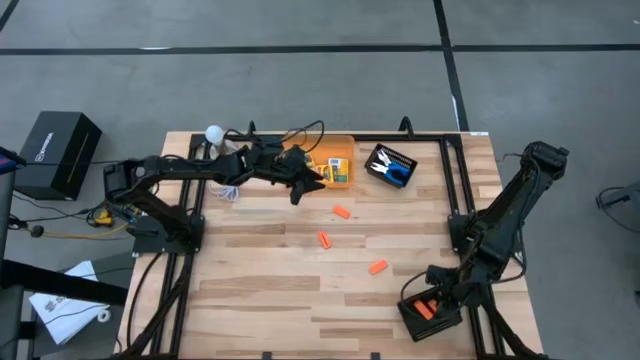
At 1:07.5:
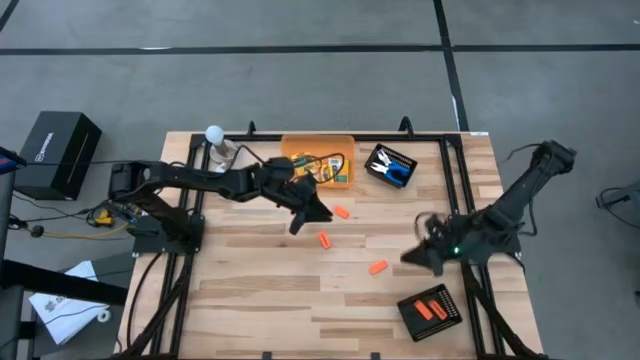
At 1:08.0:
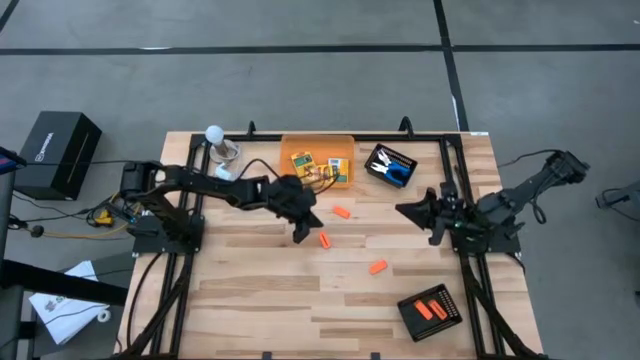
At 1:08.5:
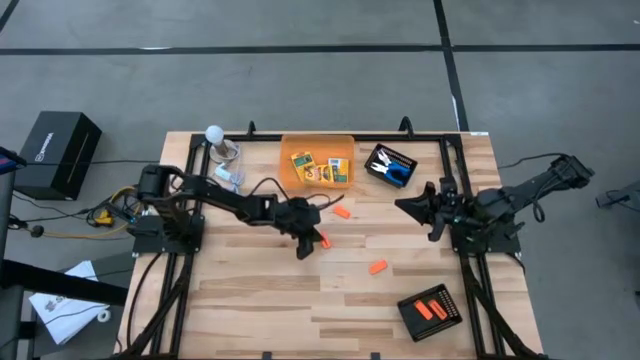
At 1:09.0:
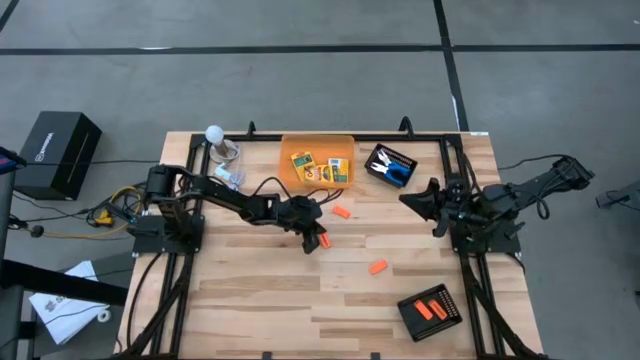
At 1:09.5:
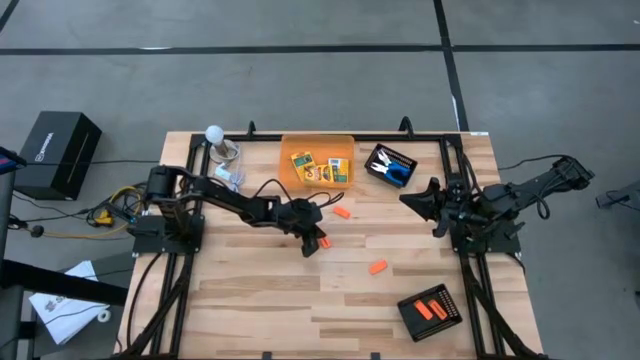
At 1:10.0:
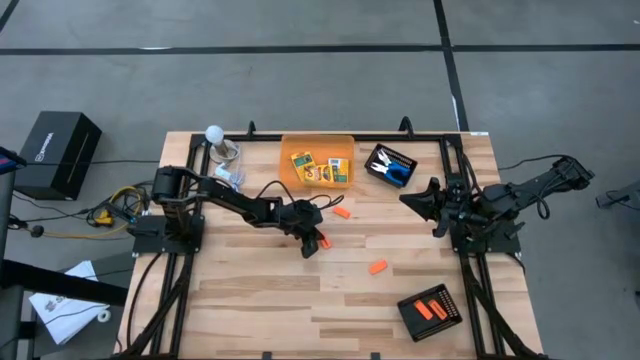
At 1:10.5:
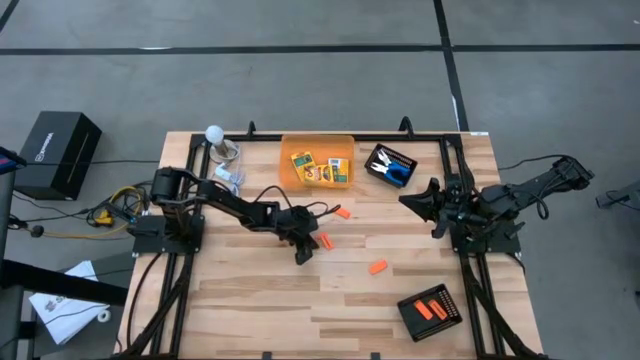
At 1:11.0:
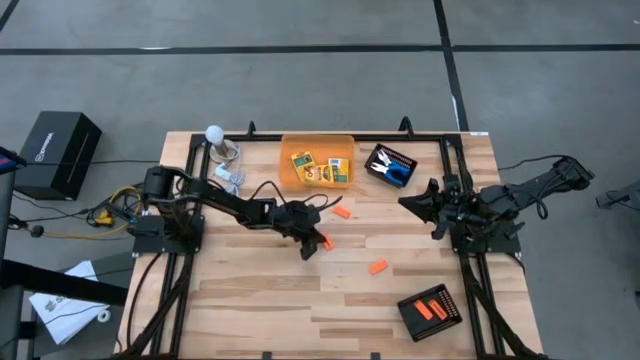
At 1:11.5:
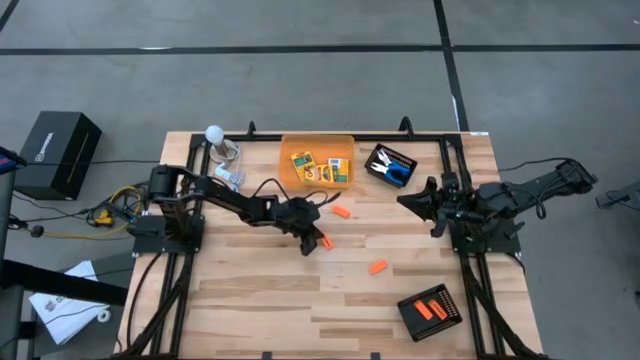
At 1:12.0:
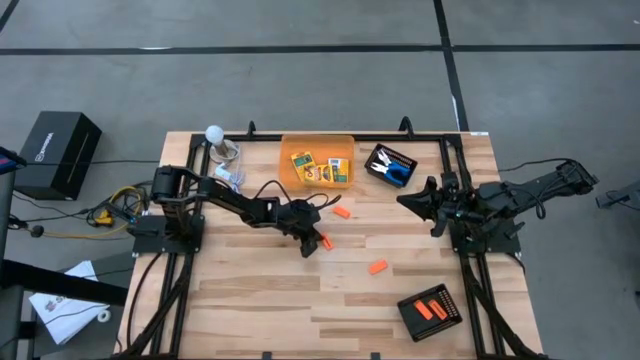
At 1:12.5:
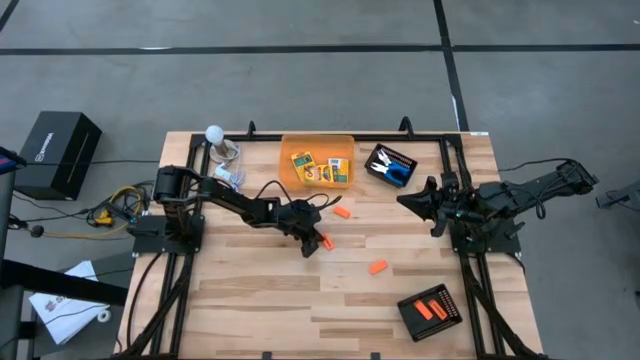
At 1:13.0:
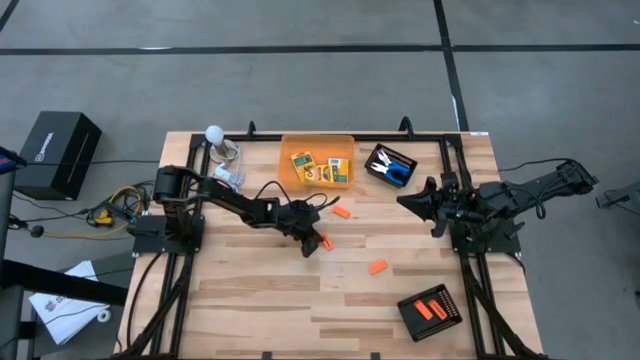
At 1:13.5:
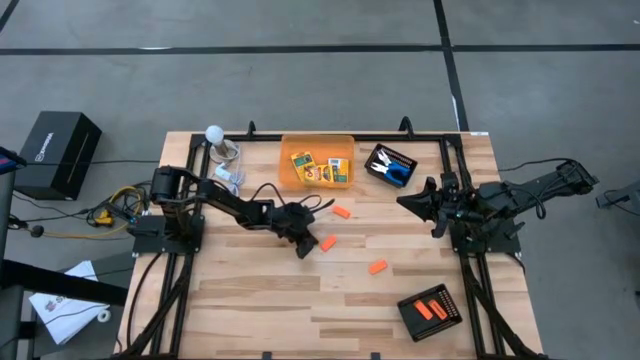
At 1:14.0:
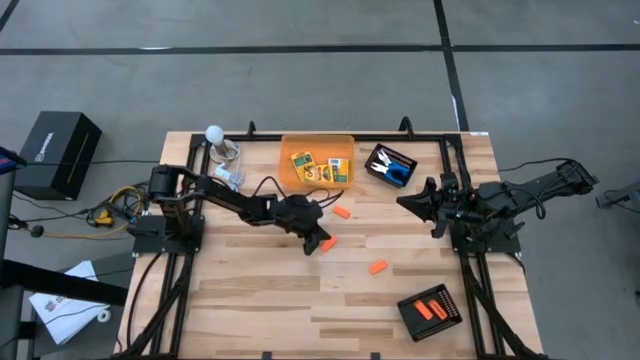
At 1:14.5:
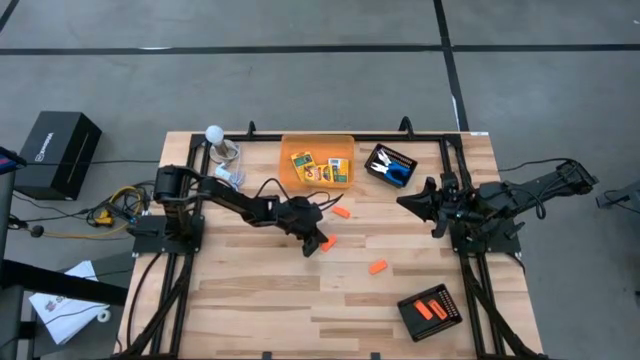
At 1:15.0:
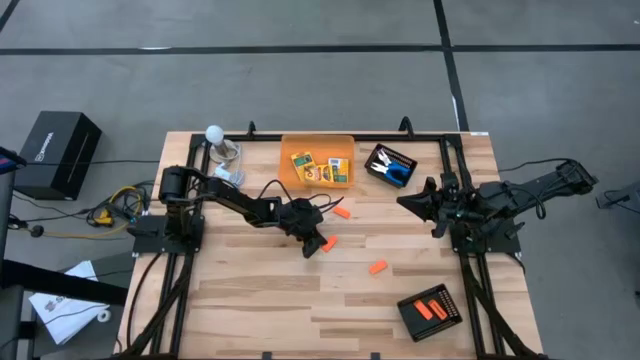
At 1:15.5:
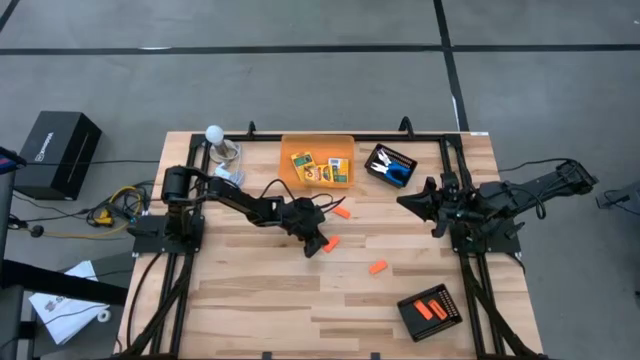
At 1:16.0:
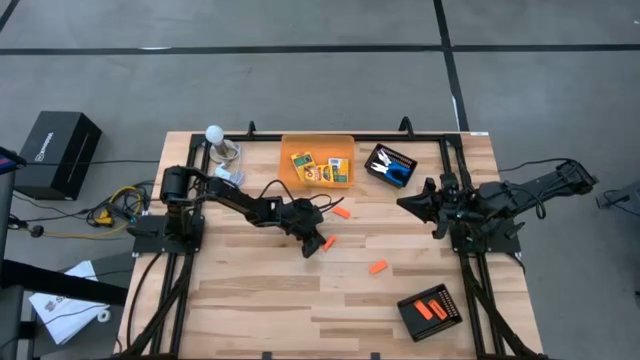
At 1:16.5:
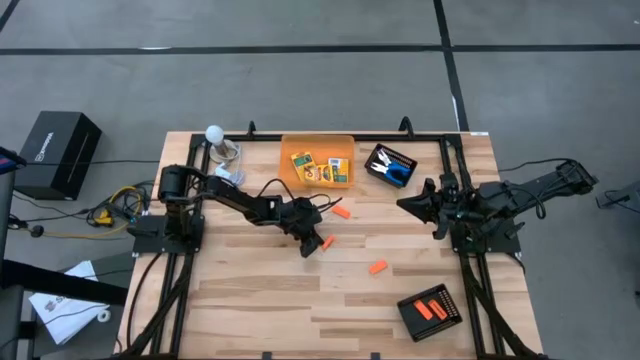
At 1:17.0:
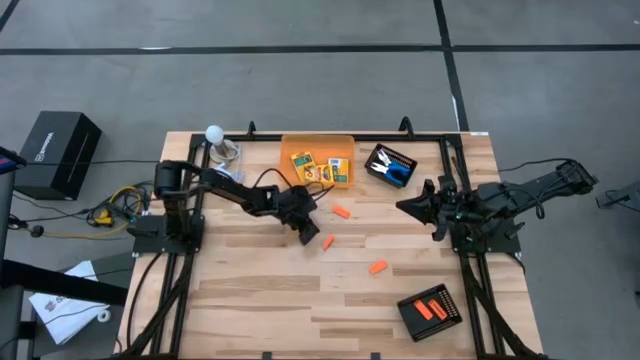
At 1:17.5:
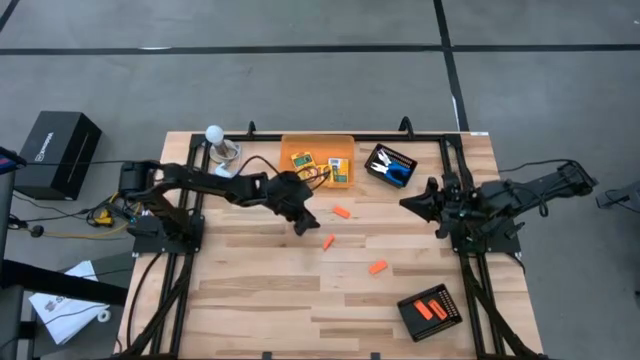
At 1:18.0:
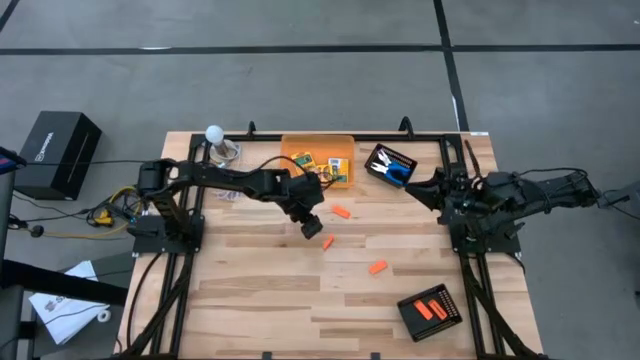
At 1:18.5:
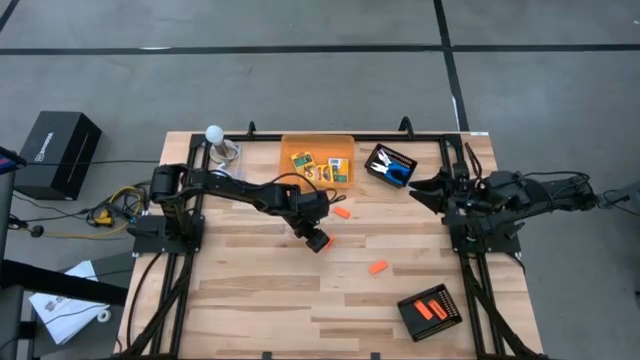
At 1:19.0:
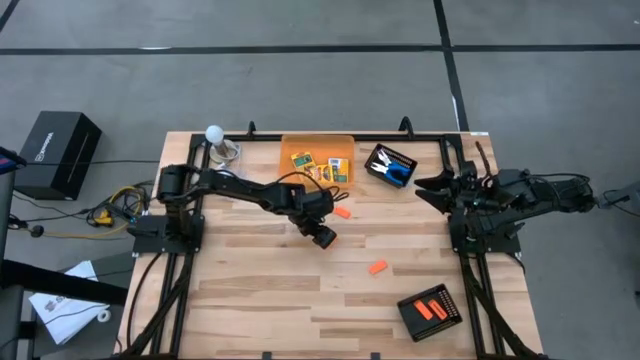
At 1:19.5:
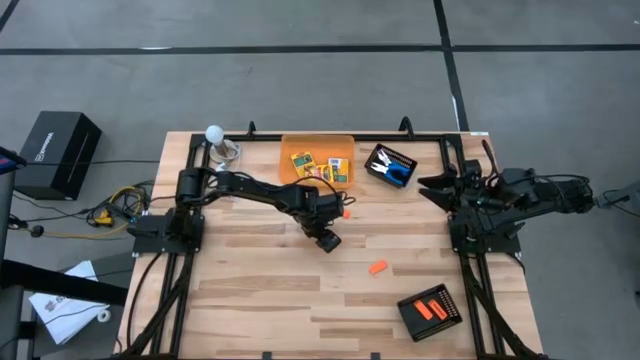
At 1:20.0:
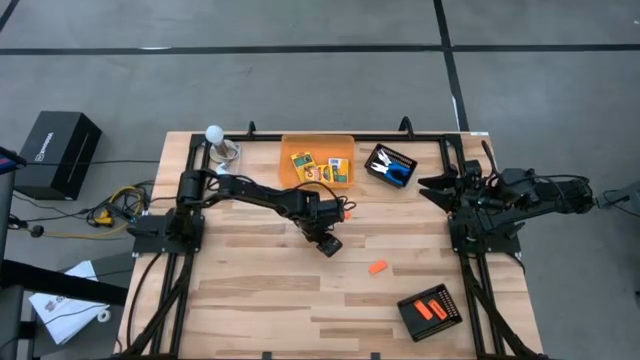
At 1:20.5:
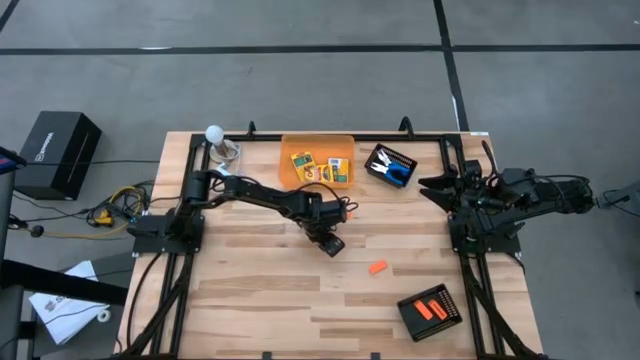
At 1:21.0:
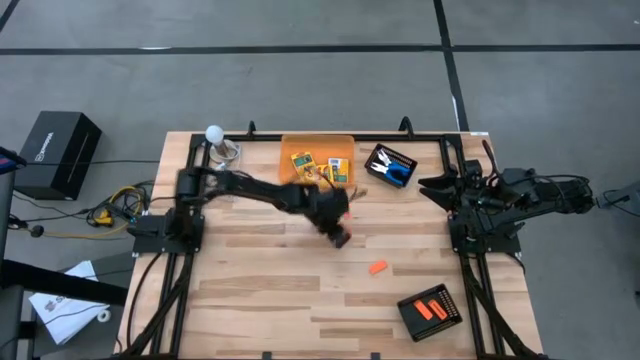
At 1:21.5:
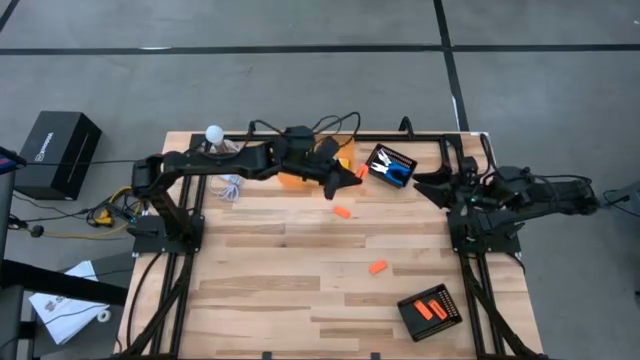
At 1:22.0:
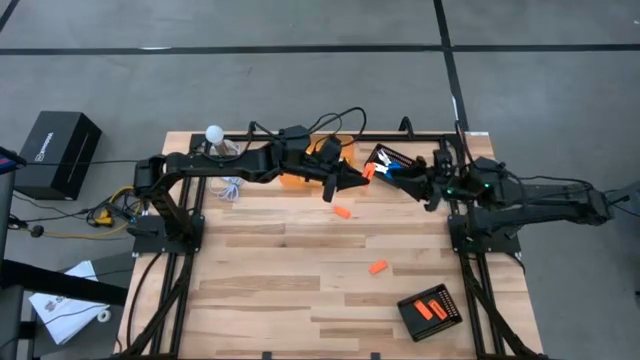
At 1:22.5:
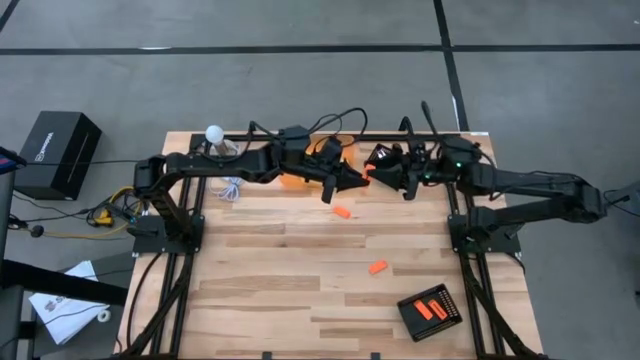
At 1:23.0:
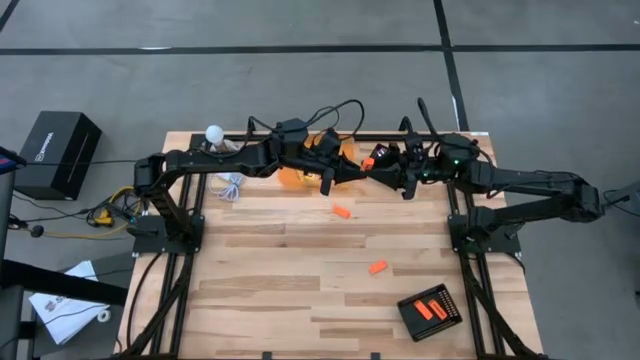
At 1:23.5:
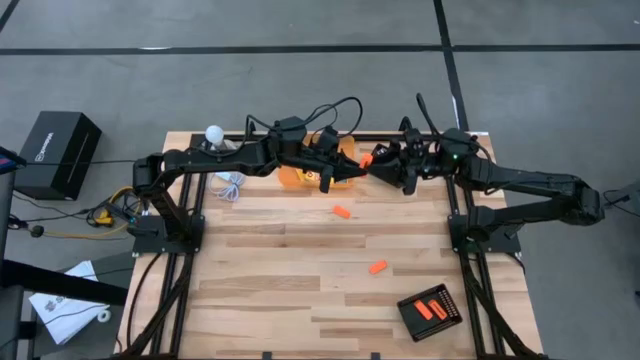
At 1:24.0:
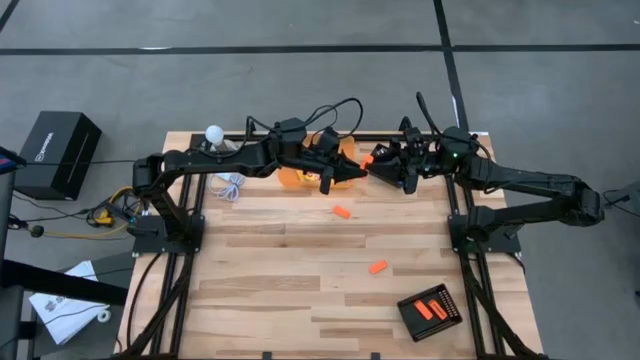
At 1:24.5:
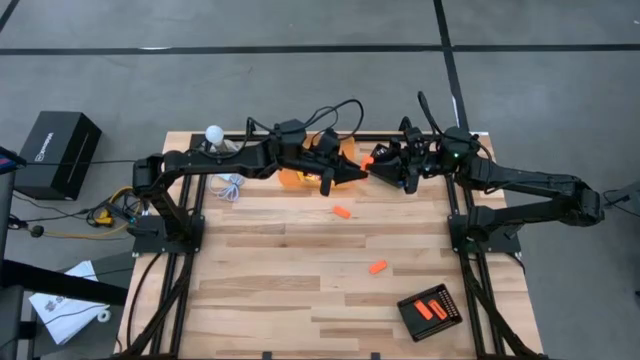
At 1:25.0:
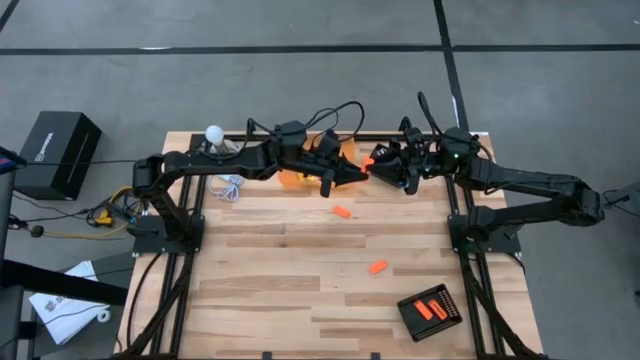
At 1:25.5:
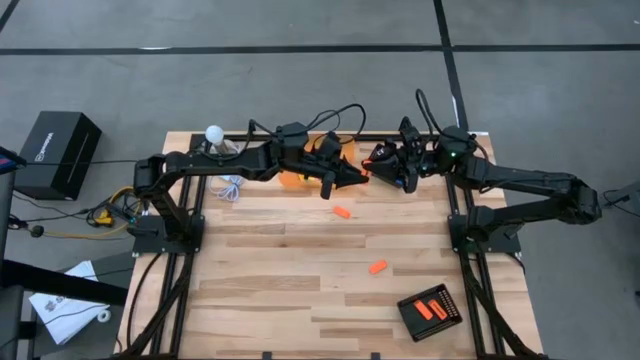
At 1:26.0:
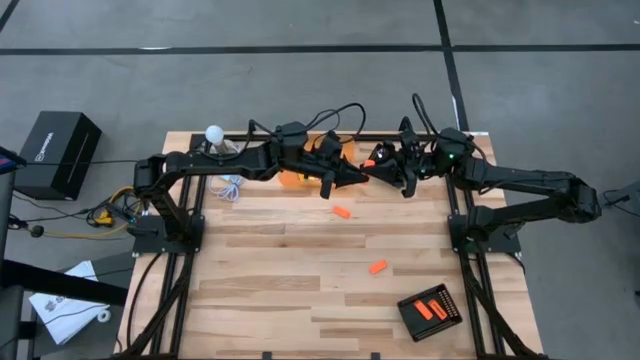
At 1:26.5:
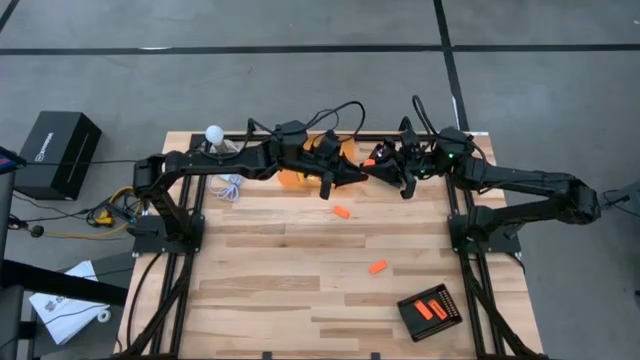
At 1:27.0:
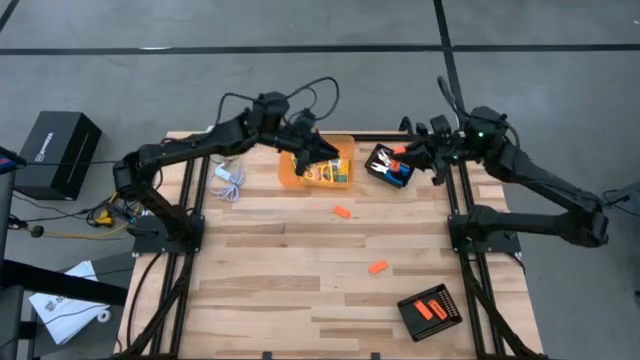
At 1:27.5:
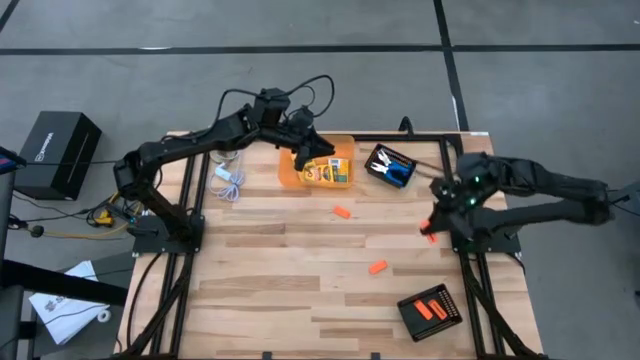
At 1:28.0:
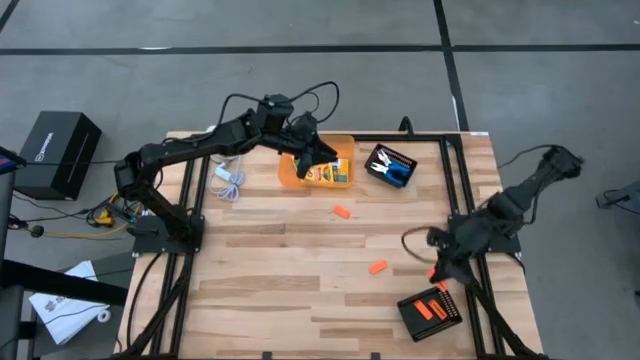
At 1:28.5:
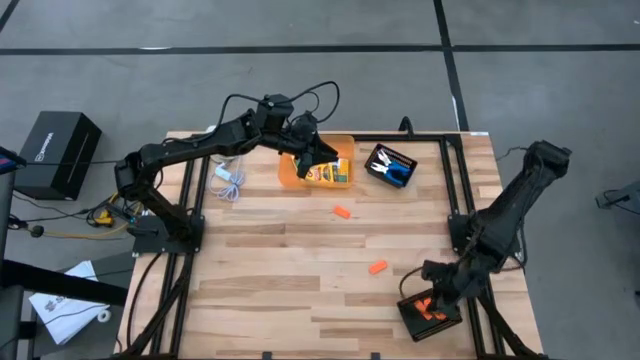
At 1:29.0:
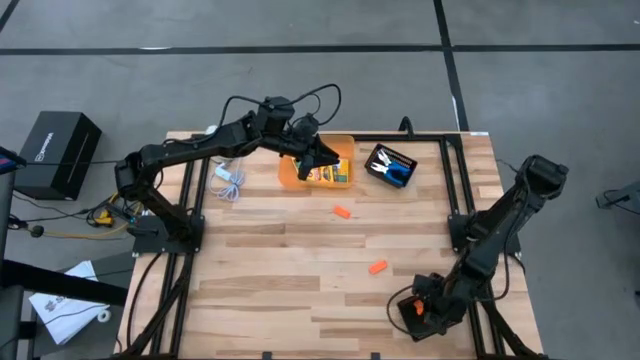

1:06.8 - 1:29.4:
Task: Pick & Place School Supplies
Put the orange eraser into the bottom black bin
